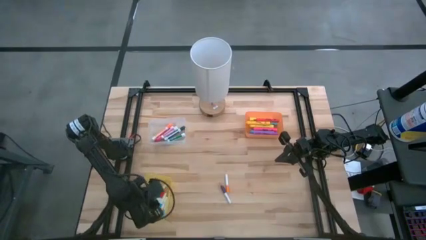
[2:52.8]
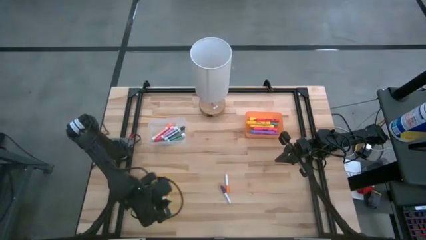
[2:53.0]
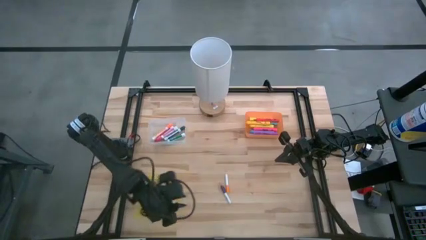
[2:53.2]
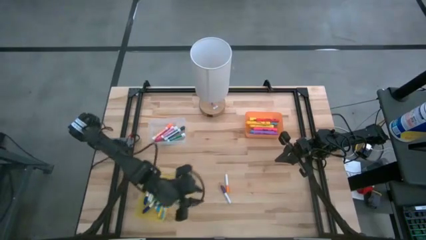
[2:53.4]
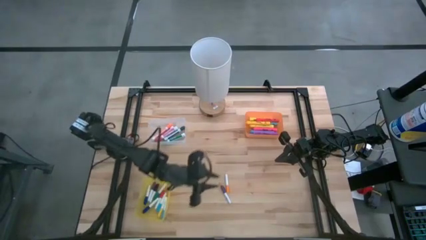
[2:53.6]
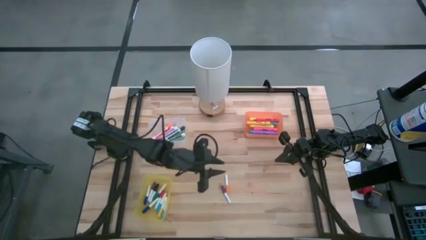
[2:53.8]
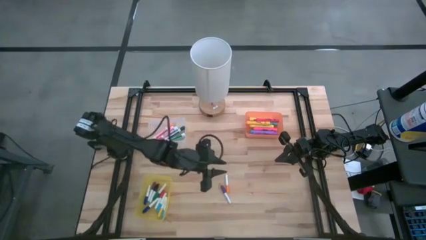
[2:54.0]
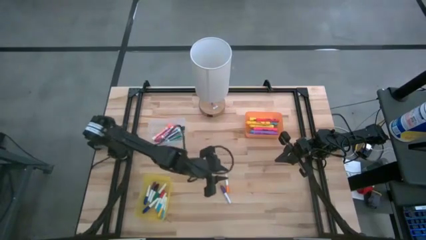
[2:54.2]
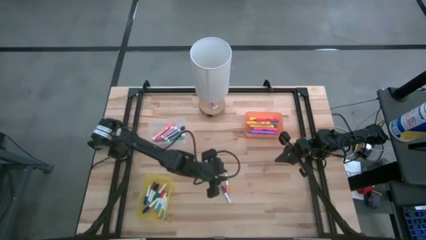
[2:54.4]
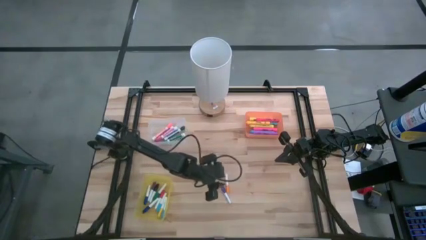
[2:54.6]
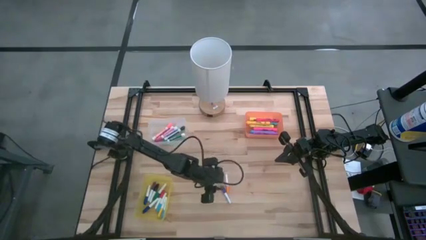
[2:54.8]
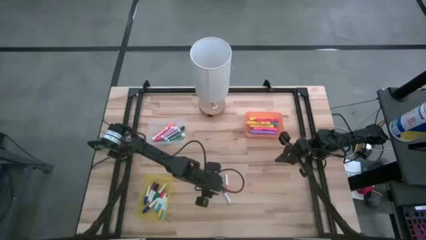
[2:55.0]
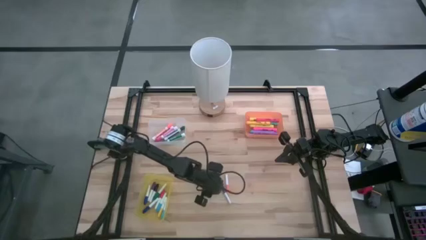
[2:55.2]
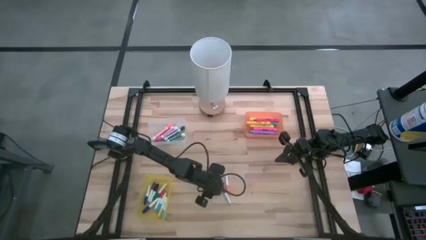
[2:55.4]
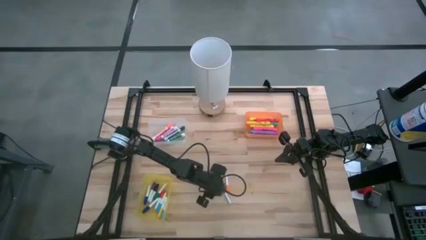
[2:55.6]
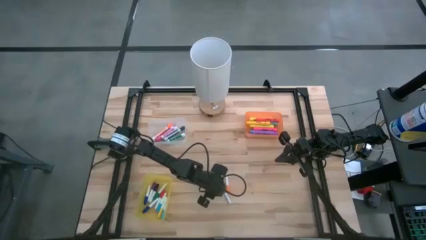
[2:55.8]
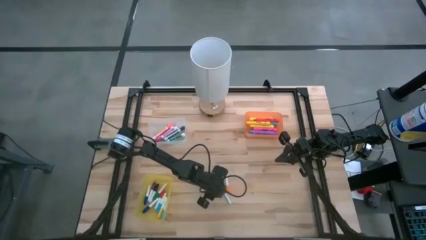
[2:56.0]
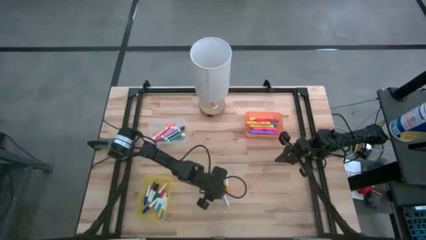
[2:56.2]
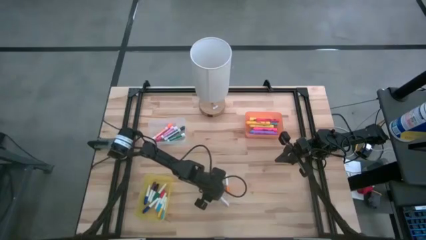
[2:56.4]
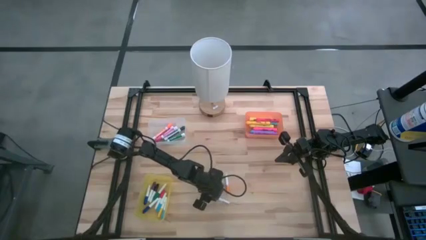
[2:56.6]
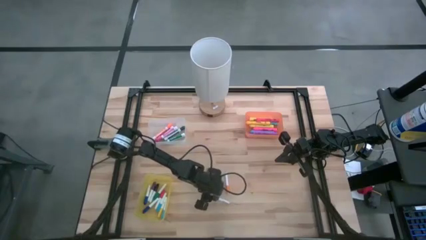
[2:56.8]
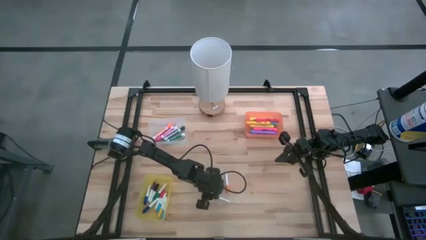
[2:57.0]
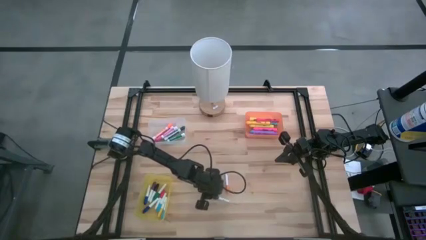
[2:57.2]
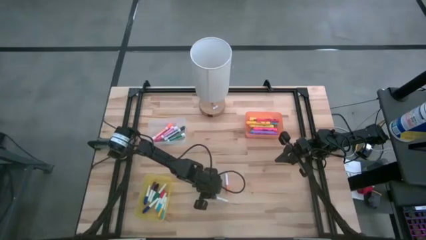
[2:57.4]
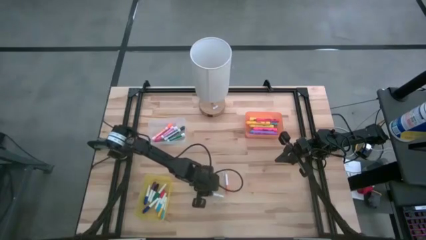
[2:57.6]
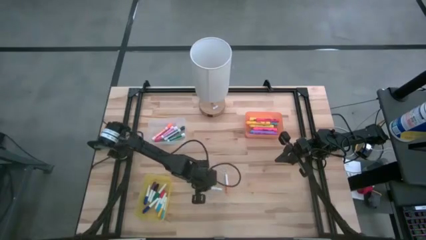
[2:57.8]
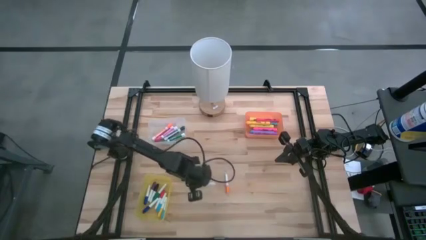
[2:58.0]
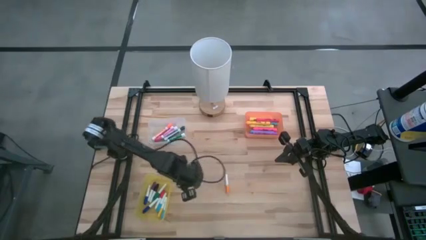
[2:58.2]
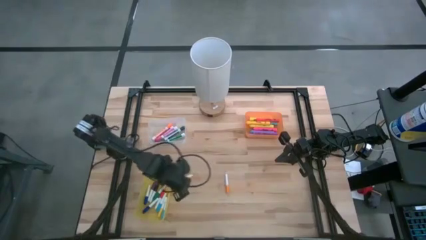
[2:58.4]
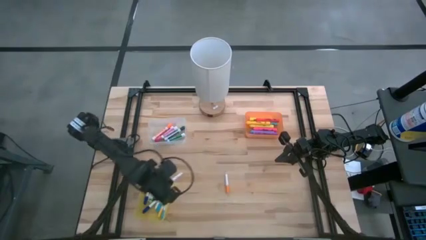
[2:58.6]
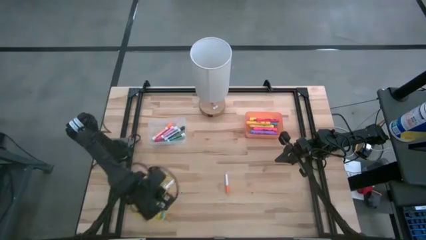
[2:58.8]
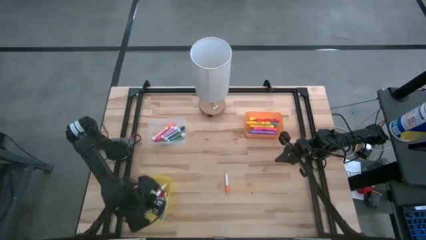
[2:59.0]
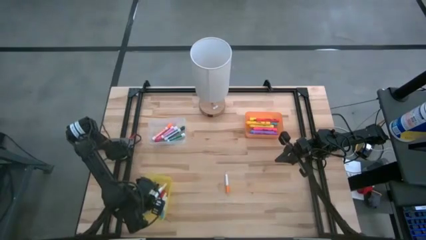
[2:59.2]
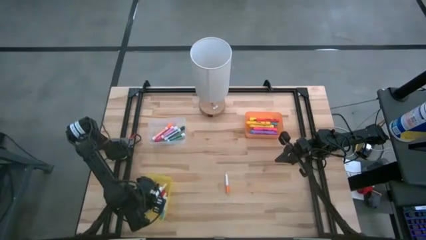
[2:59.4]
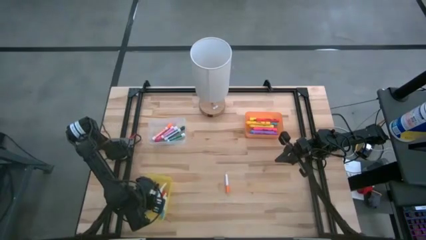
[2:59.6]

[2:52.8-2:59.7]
Task: Pick & Place Markers
Put the small purple highlighter pen into the yellow bin

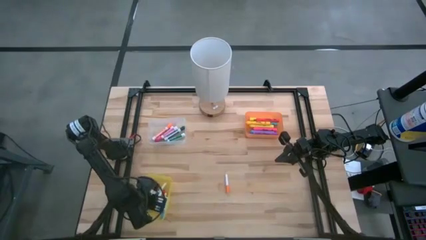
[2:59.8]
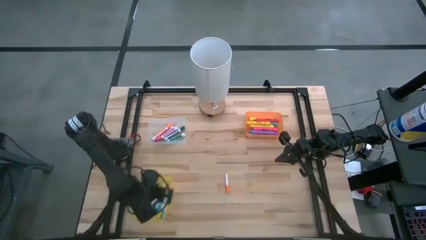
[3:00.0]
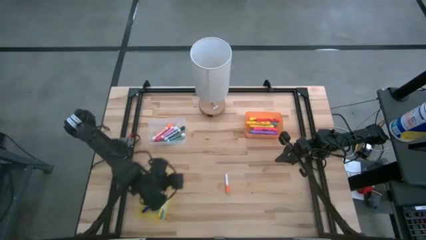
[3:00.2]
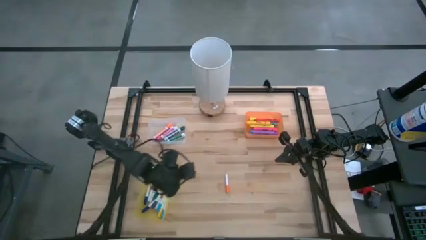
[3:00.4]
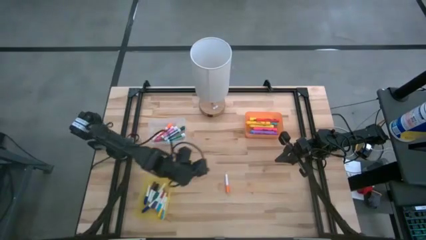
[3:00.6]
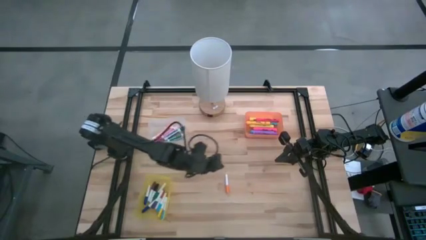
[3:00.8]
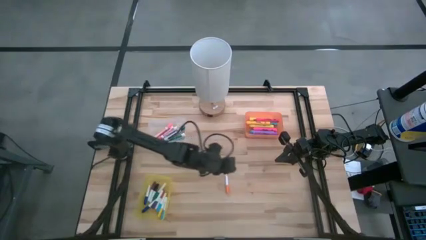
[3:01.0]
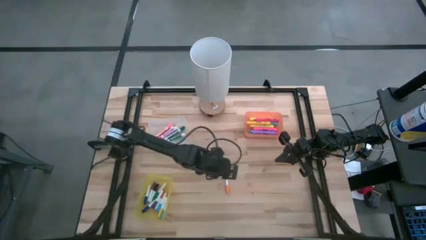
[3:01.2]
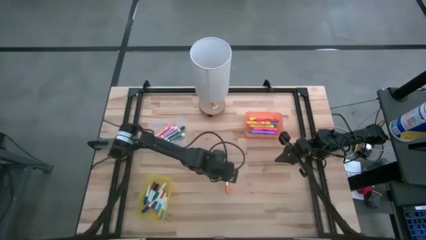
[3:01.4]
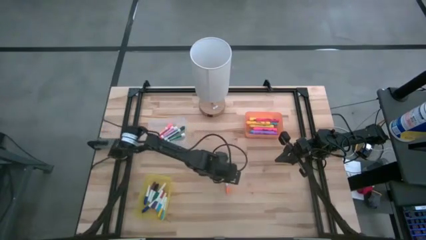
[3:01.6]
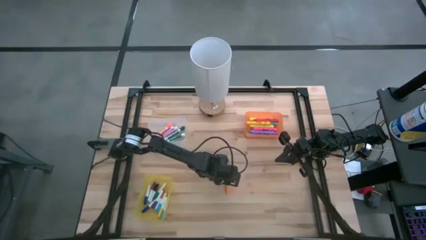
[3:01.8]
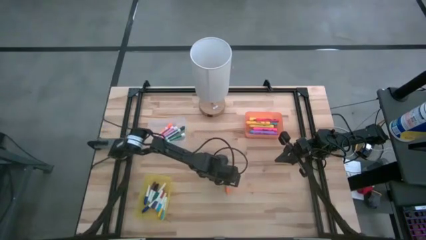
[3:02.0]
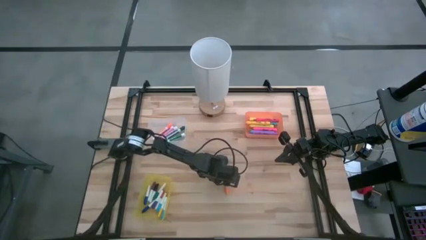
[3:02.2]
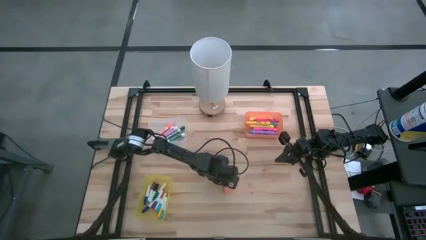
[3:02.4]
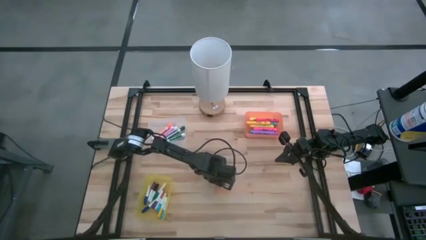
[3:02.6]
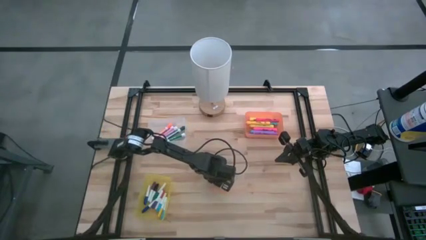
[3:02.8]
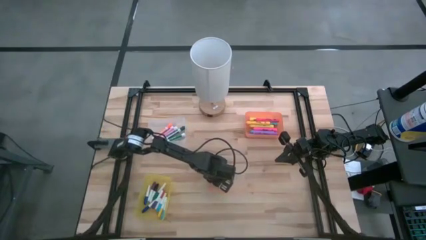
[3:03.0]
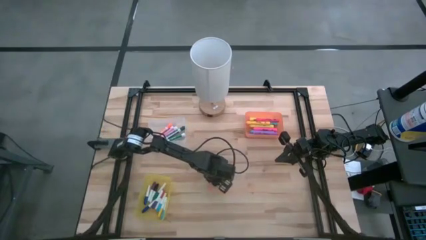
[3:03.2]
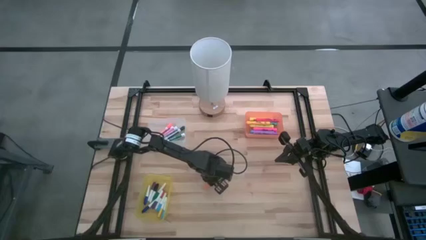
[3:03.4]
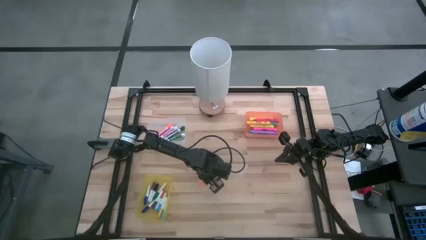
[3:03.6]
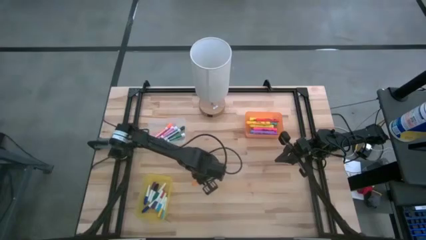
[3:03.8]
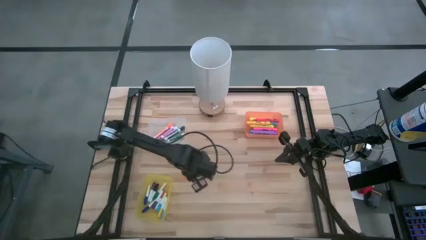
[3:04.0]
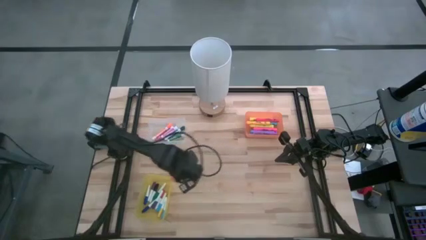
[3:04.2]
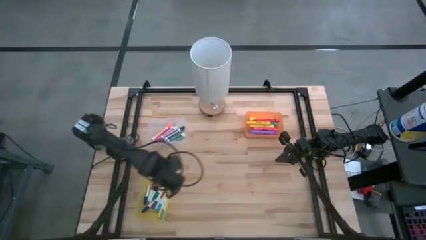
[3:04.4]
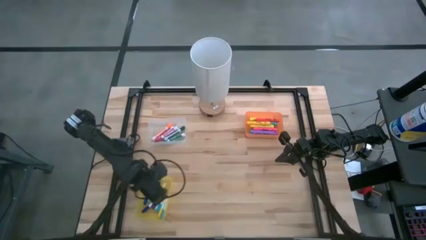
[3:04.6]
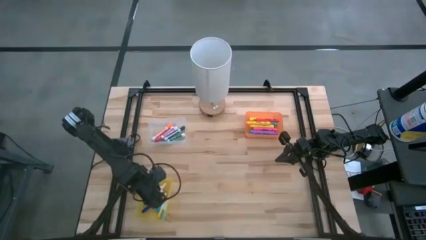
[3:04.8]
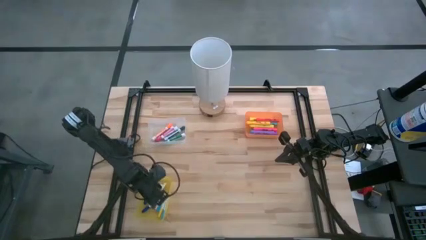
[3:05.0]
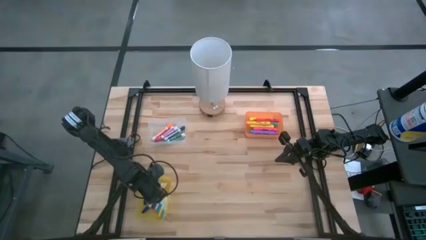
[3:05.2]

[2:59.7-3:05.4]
Put the small orange highlighter pen into the yellow bin

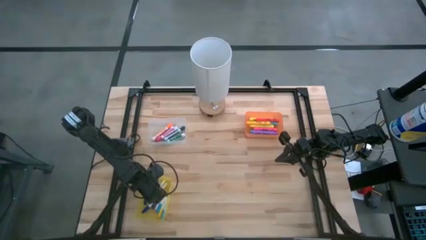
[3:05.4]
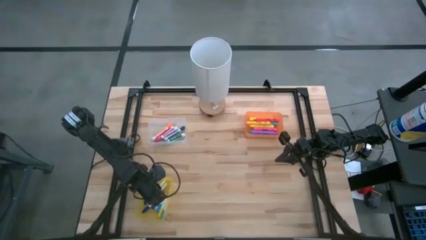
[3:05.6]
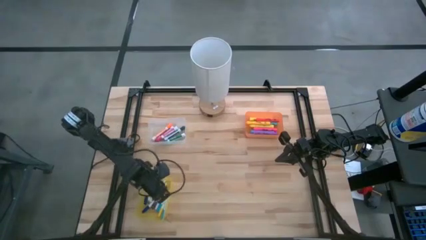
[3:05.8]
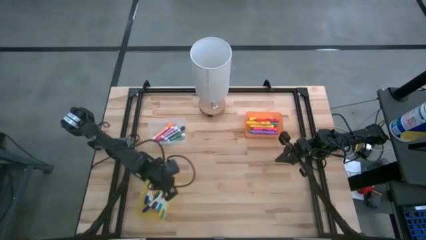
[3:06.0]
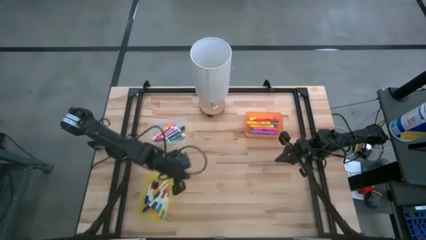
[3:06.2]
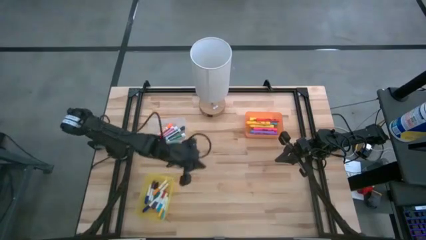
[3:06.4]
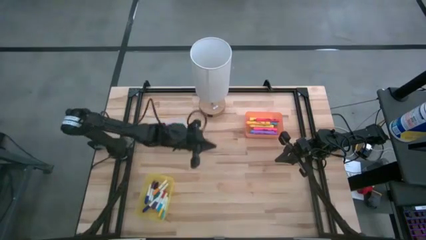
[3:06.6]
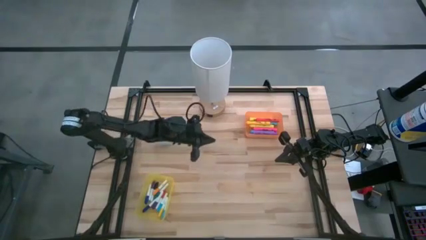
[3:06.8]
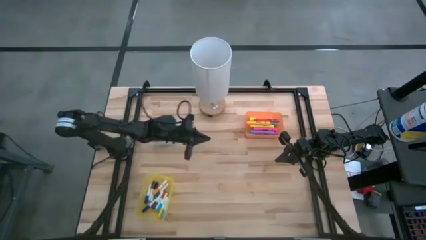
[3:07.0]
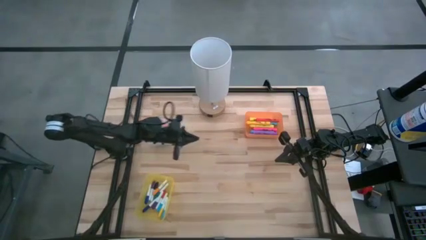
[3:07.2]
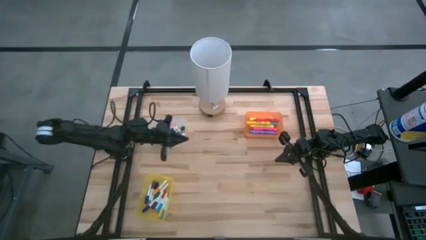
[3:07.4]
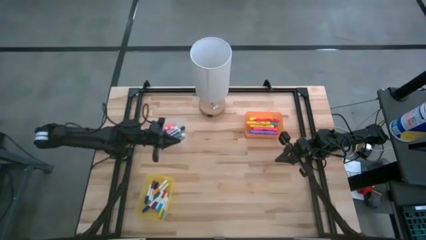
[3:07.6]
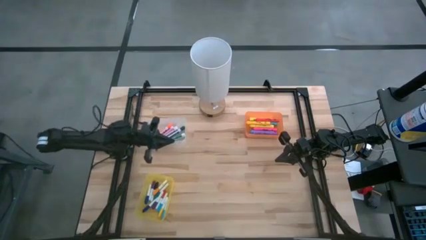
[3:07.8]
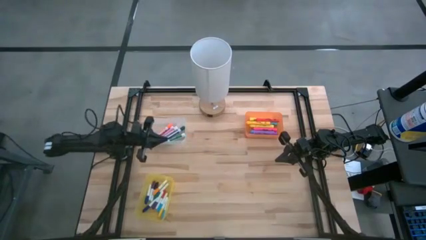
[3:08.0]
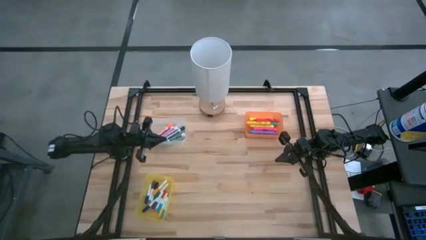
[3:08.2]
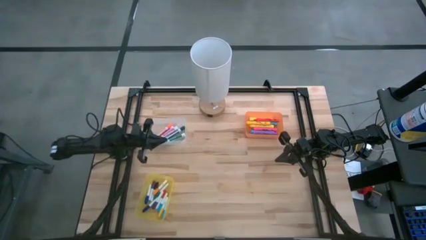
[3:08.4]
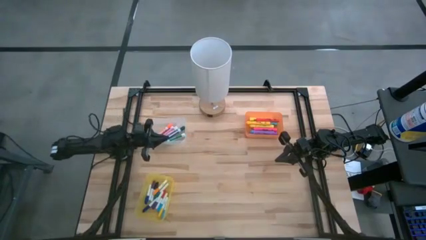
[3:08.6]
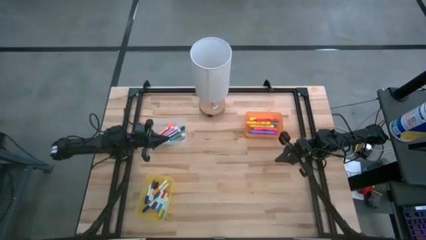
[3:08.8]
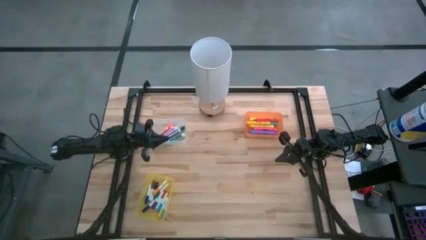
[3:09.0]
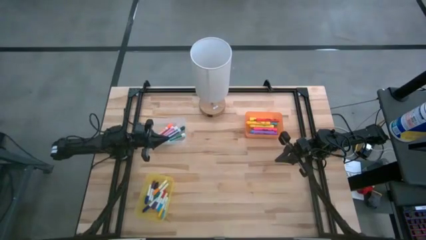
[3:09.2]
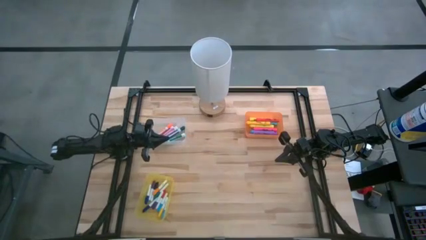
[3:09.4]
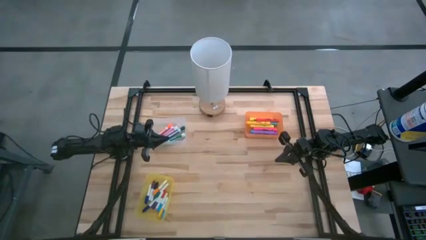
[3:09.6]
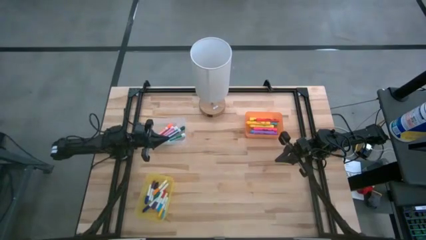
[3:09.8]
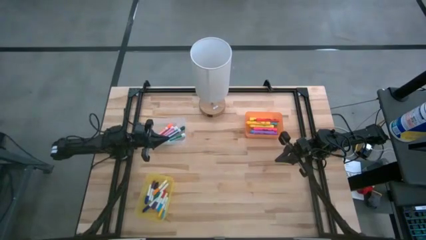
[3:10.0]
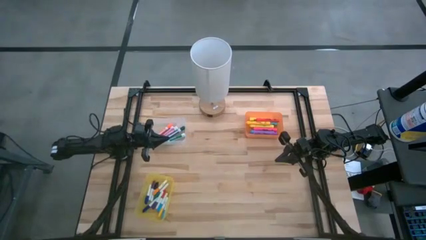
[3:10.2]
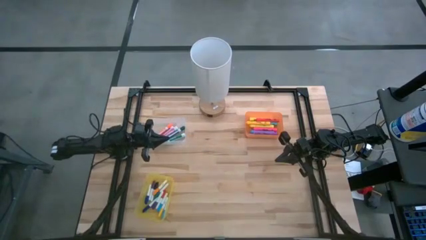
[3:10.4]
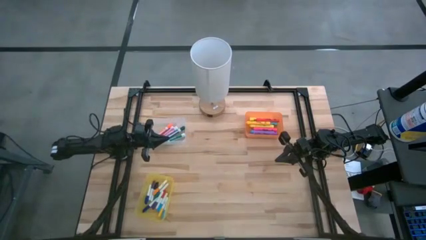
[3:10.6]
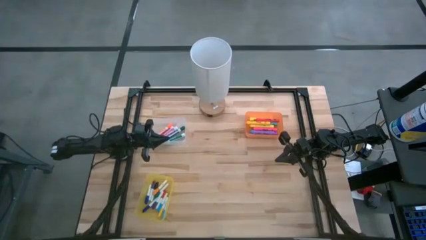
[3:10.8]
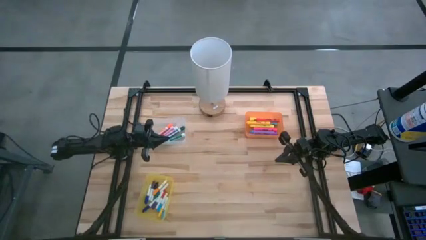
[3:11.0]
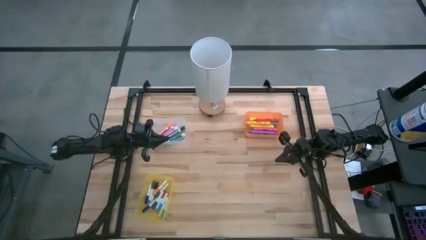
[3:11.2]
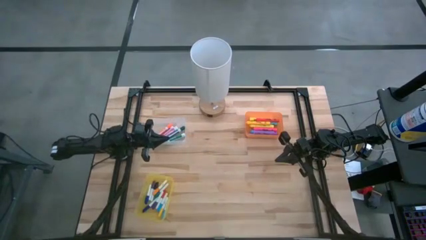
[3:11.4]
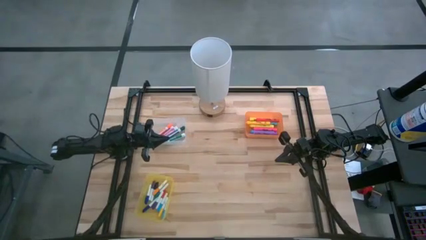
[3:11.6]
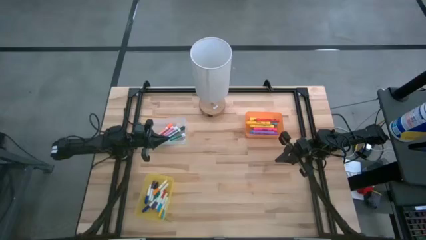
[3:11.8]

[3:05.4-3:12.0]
Return to Home Position
